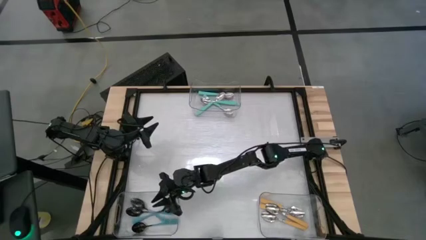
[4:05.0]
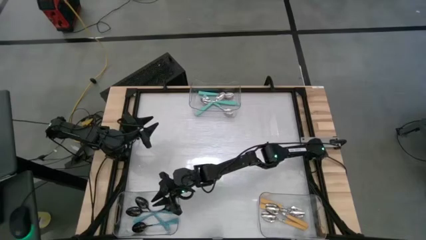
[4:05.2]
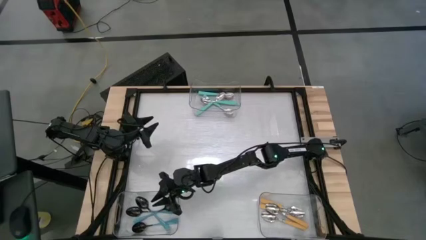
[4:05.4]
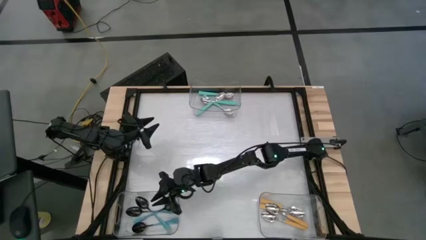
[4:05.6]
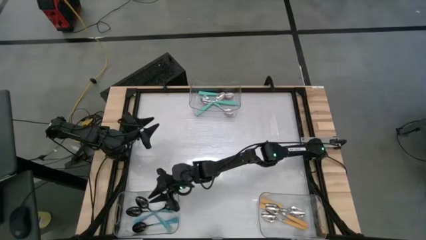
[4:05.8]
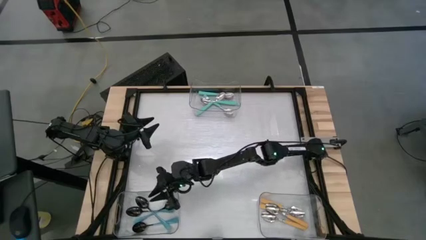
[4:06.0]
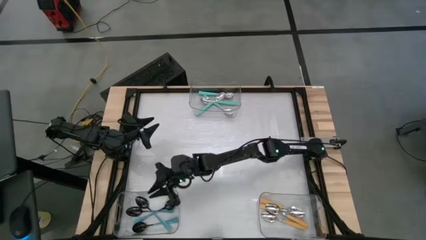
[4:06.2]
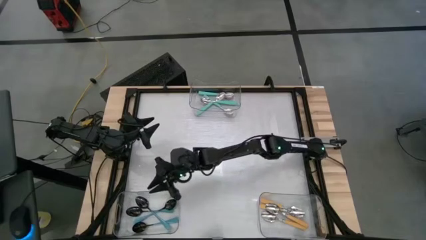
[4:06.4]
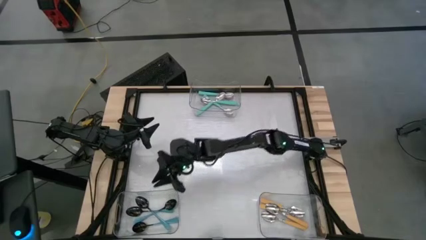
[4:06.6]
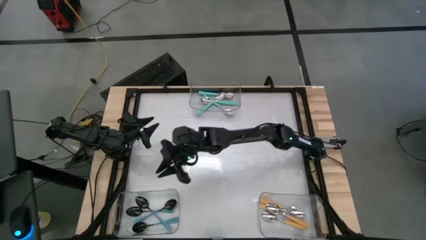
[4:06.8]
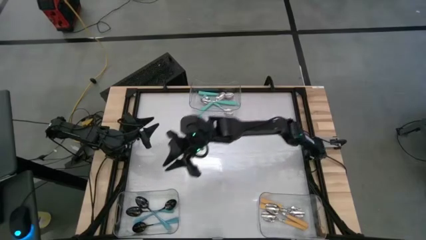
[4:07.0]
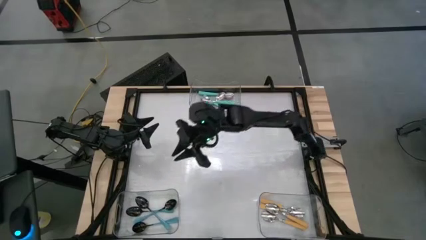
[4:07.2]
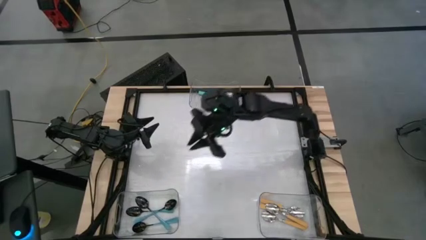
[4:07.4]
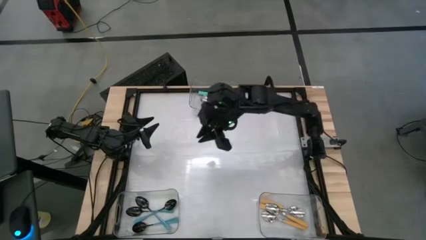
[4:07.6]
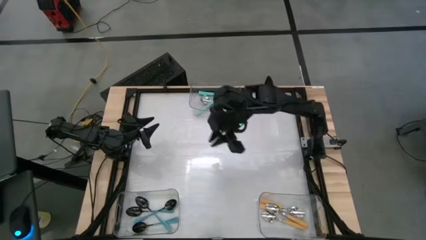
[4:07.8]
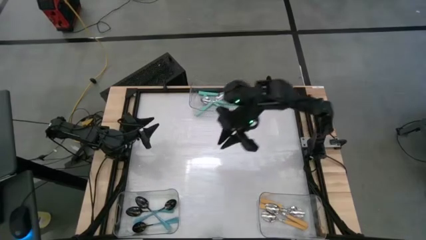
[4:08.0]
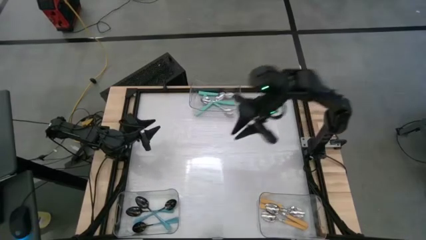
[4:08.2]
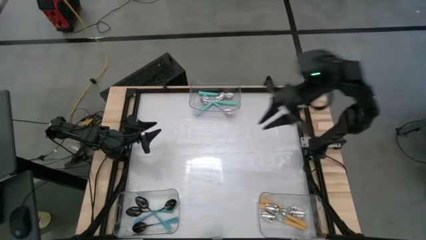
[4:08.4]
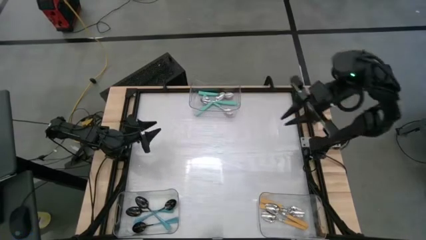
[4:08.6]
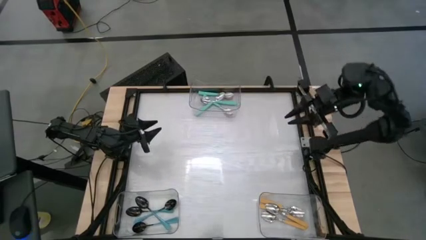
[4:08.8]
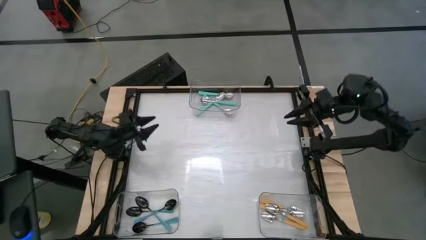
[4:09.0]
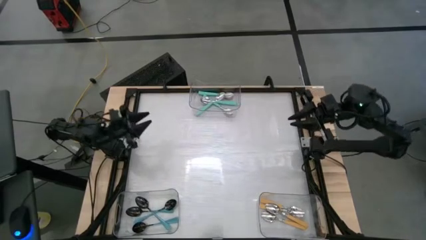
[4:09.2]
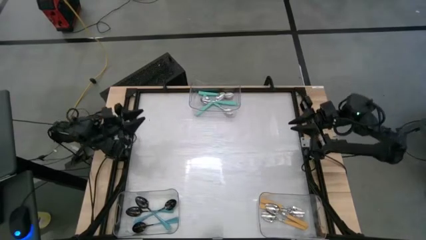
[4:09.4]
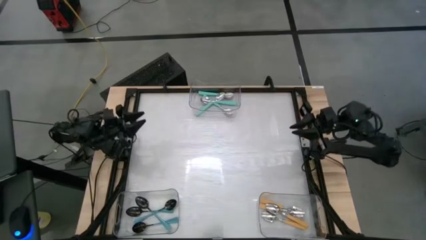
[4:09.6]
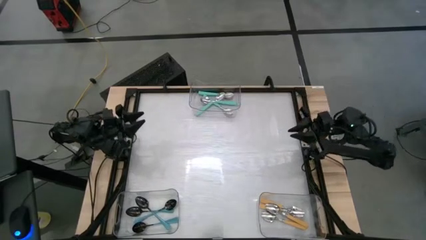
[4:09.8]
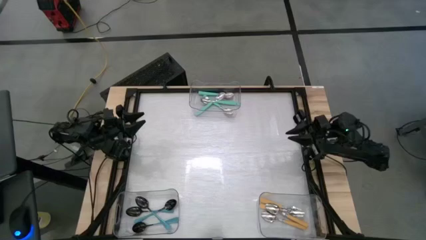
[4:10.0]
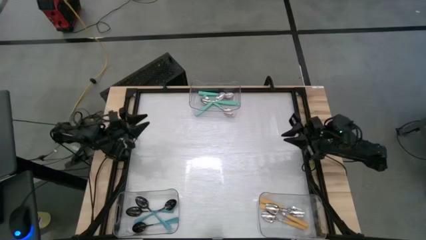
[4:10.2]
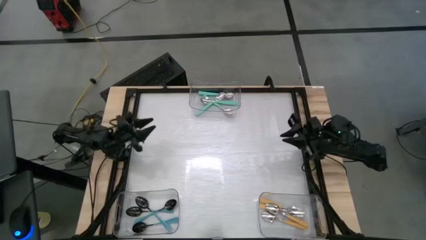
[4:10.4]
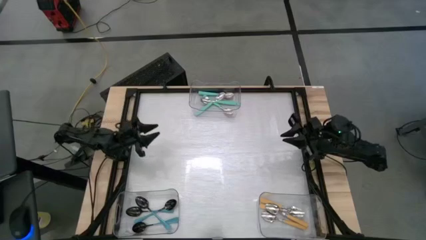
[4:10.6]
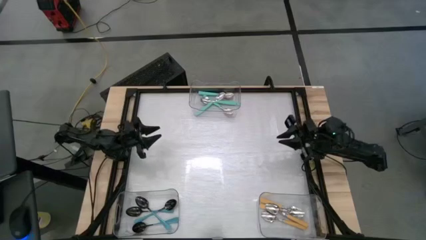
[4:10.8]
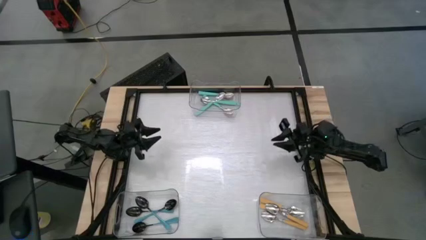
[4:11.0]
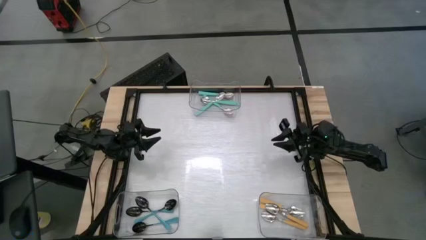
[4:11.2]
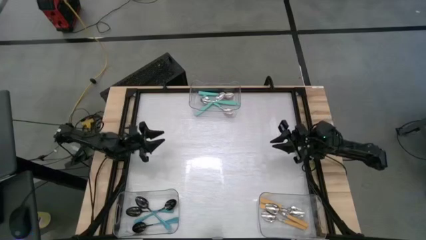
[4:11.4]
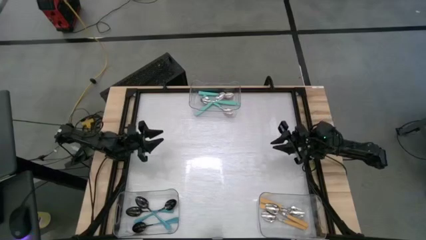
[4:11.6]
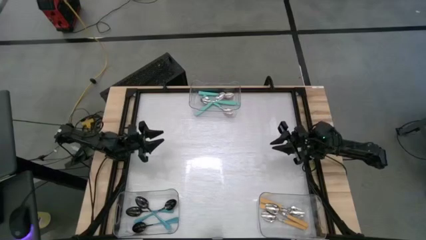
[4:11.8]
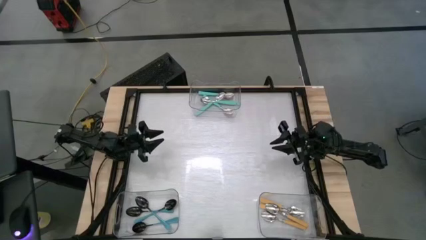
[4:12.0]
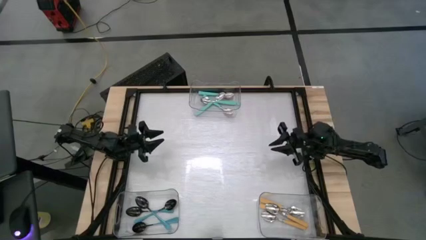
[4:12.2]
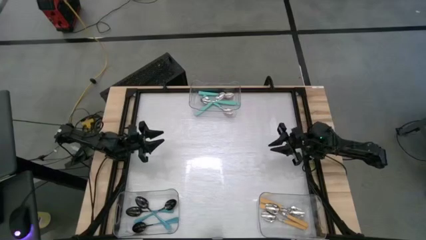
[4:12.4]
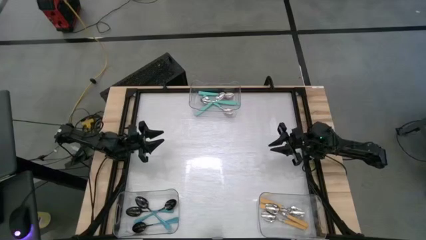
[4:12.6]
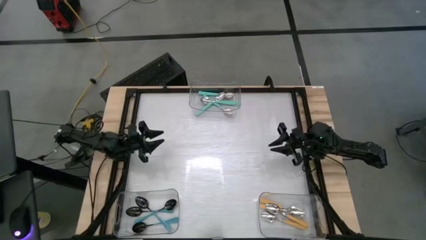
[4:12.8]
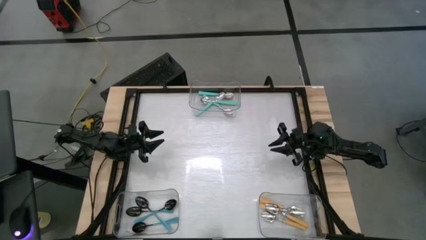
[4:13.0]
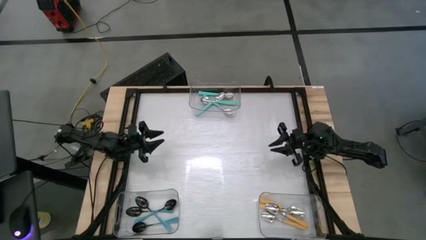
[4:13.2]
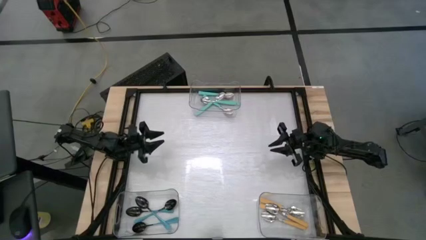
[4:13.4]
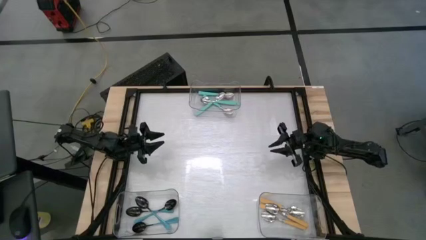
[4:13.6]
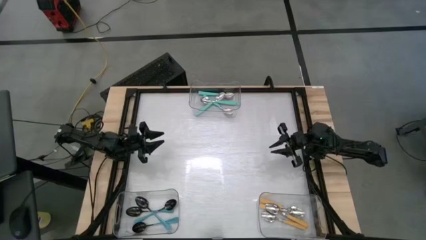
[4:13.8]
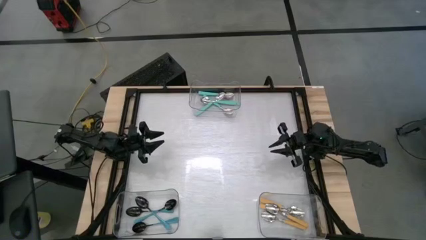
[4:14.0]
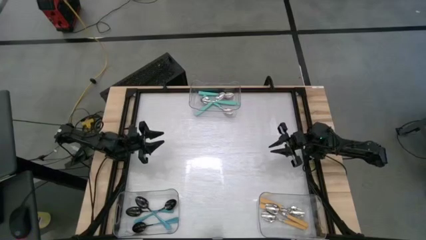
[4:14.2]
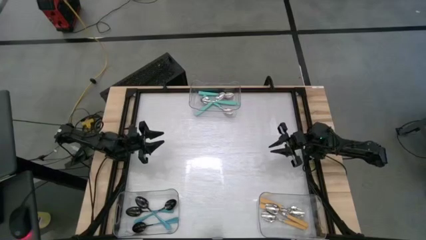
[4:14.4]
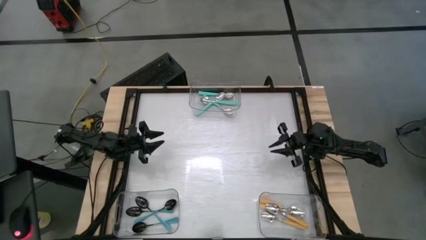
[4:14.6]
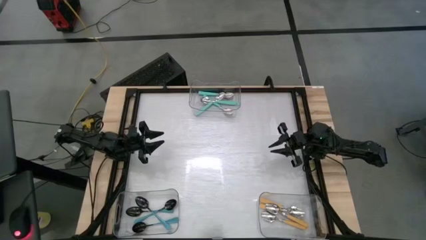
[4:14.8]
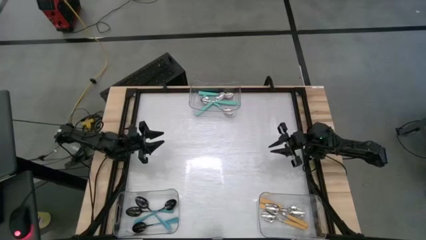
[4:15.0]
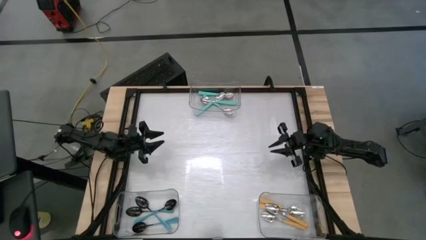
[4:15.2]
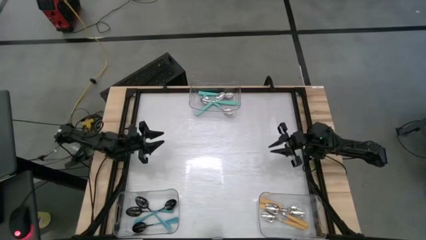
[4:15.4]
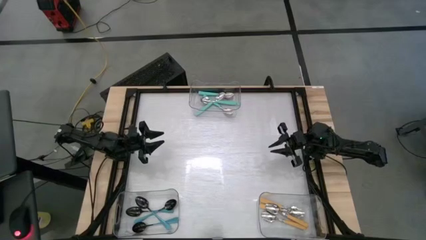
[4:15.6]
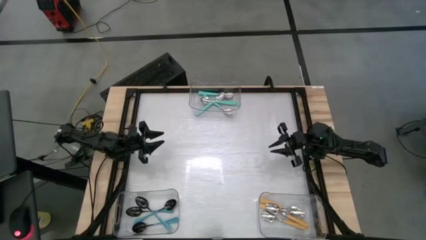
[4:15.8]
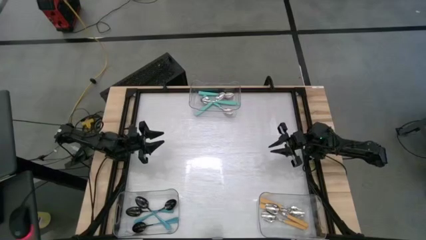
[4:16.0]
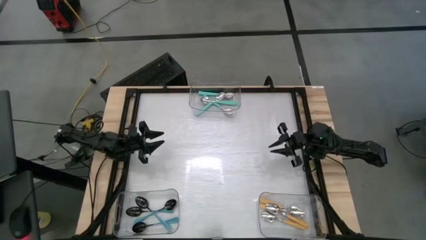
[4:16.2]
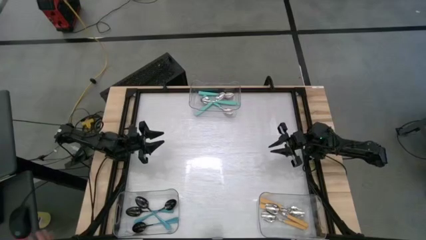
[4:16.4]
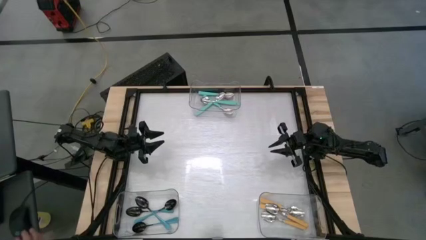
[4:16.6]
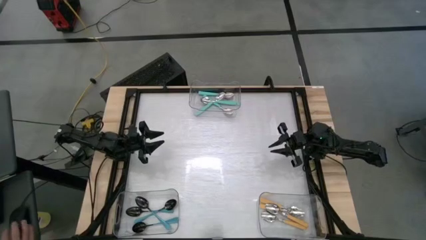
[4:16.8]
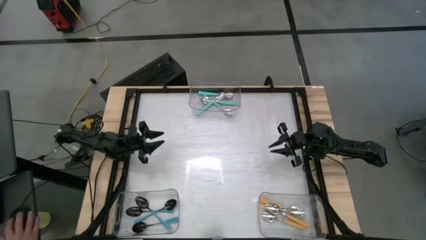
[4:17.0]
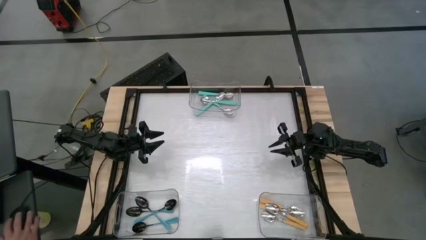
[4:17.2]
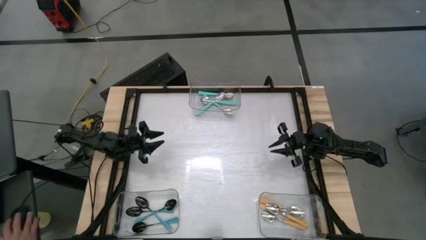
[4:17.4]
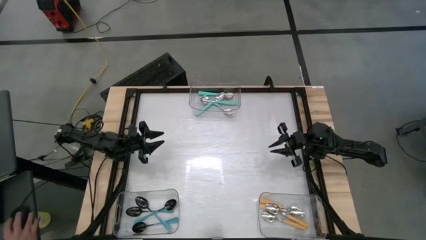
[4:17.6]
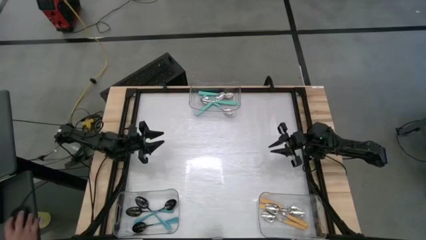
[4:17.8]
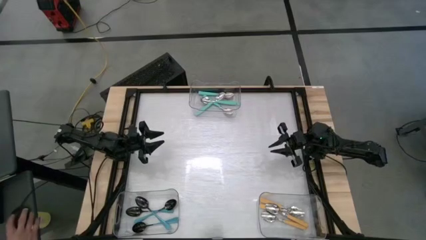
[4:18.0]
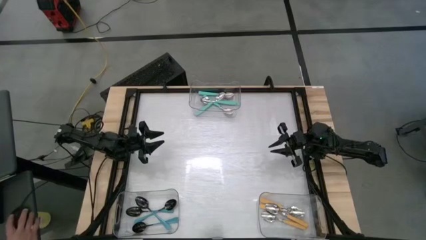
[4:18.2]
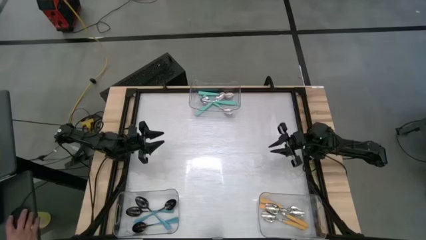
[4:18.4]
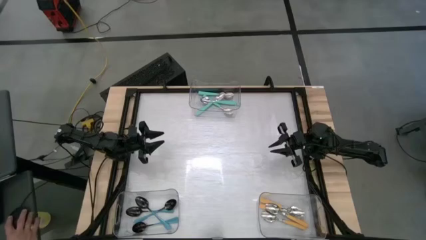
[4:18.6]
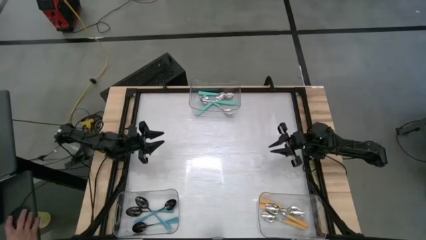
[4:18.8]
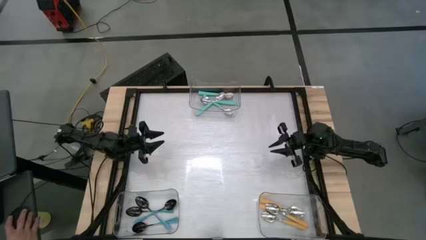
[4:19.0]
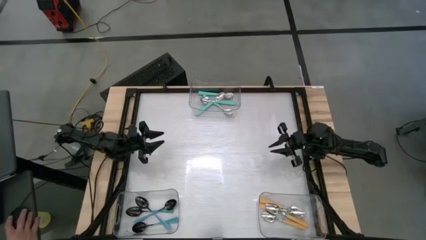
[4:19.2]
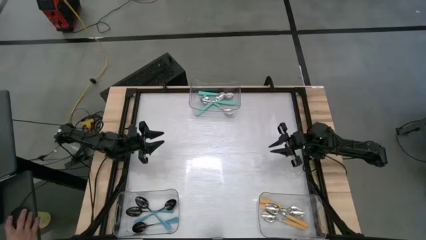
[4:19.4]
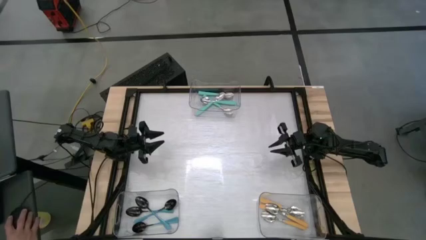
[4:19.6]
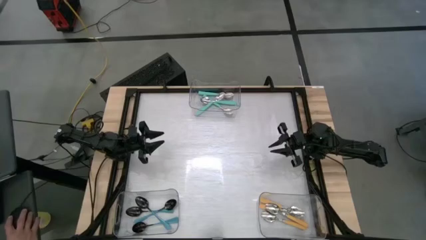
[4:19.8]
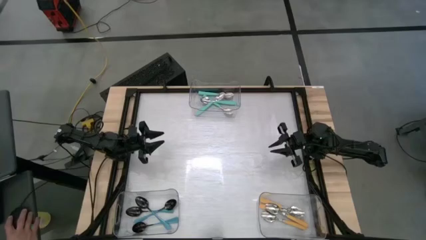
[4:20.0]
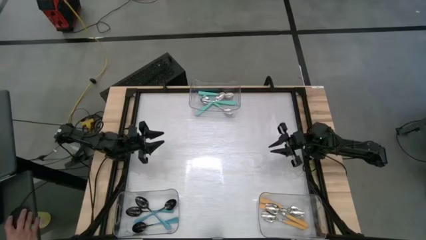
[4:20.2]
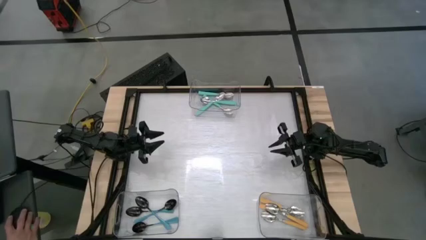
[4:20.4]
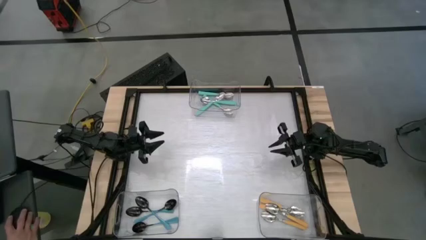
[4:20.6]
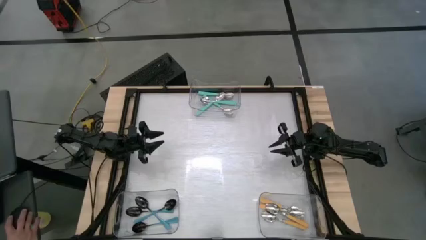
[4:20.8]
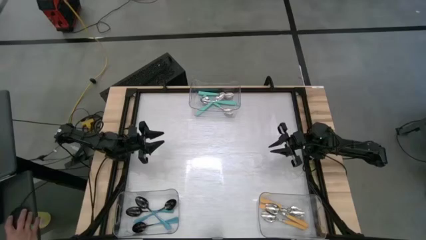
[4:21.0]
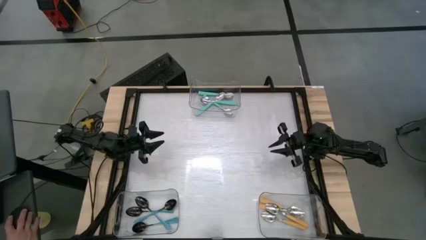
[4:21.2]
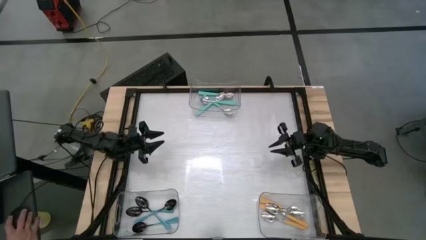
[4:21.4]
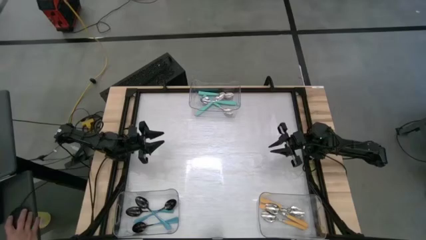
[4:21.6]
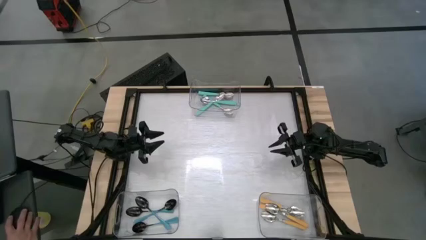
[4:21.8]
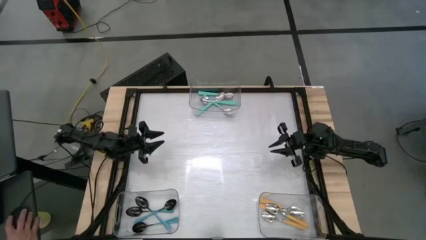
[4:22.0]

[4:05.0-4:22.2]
Task: Sort silverware by color (type)
Return to home position
